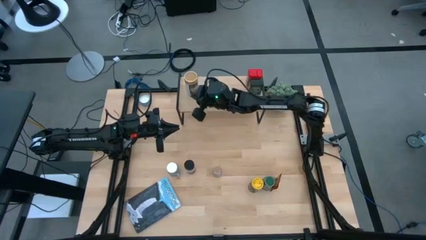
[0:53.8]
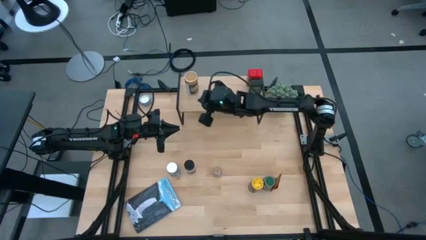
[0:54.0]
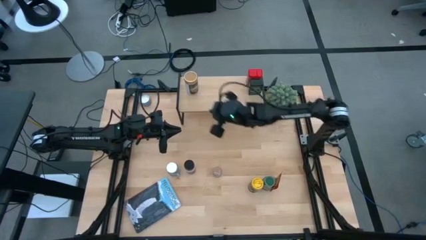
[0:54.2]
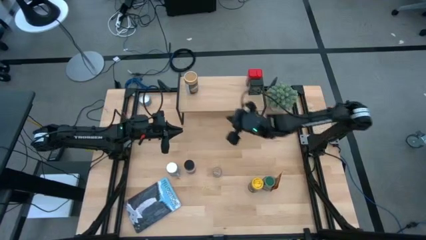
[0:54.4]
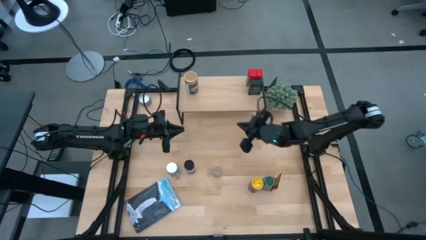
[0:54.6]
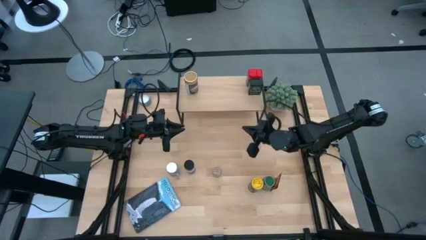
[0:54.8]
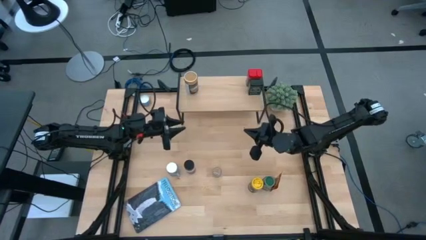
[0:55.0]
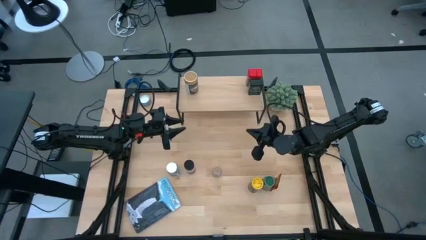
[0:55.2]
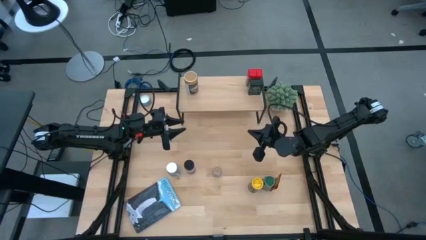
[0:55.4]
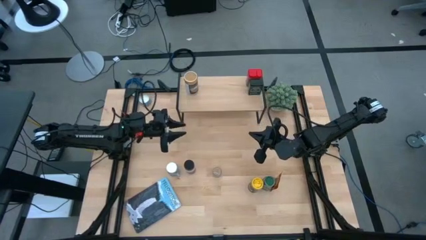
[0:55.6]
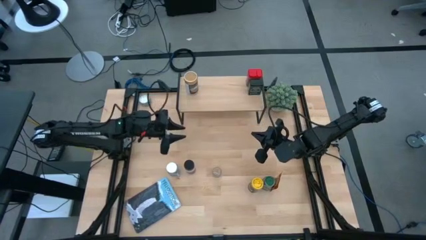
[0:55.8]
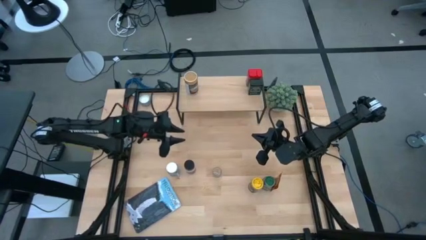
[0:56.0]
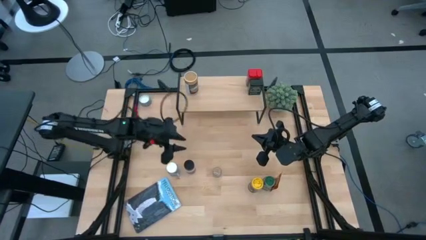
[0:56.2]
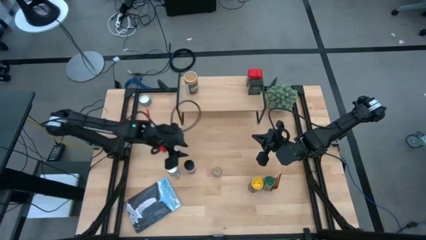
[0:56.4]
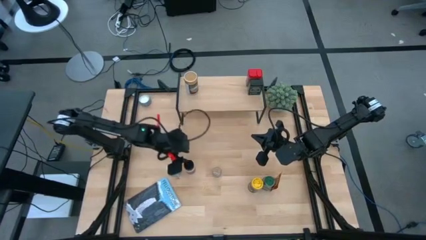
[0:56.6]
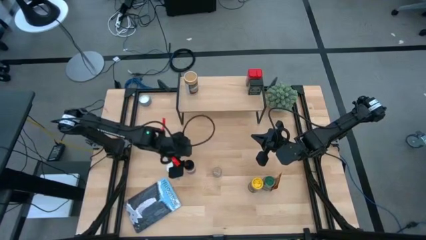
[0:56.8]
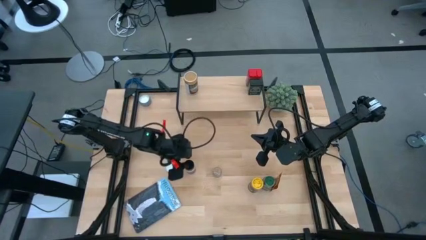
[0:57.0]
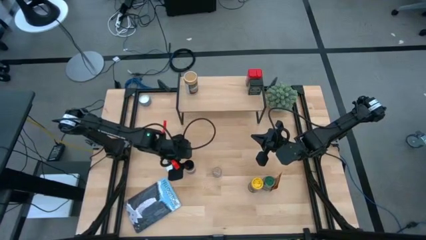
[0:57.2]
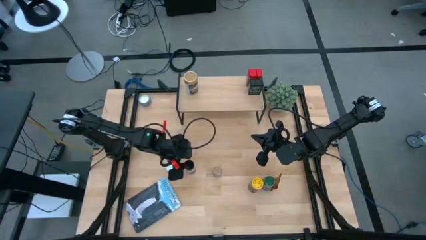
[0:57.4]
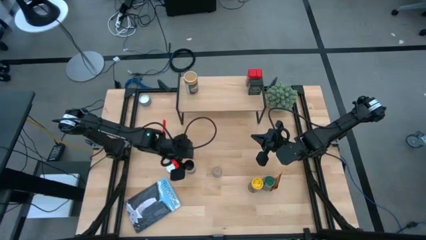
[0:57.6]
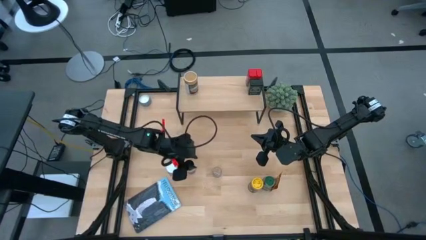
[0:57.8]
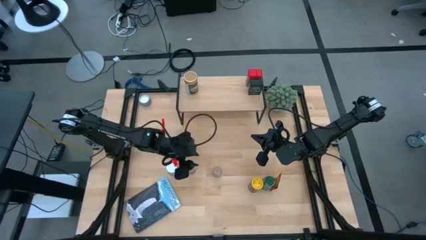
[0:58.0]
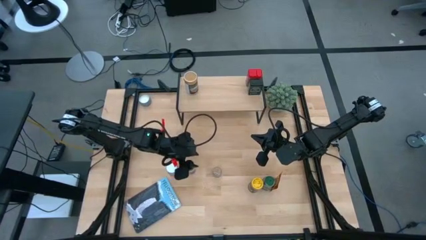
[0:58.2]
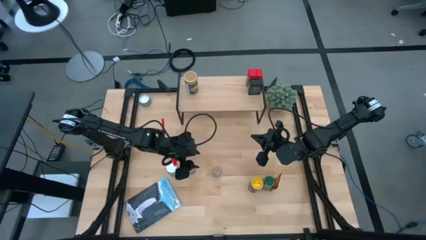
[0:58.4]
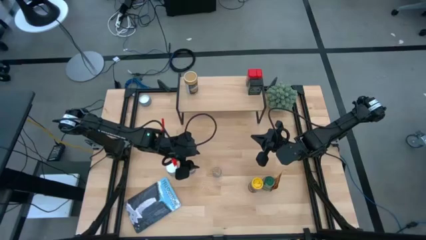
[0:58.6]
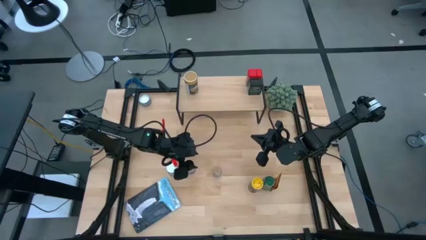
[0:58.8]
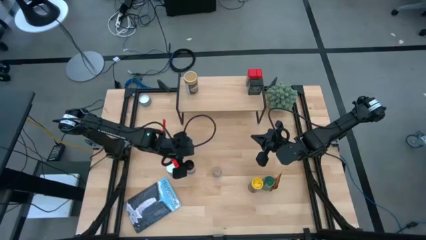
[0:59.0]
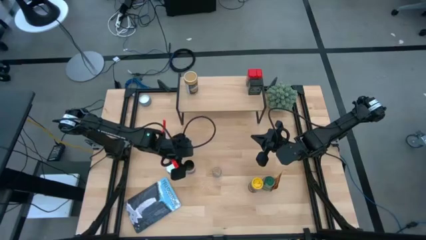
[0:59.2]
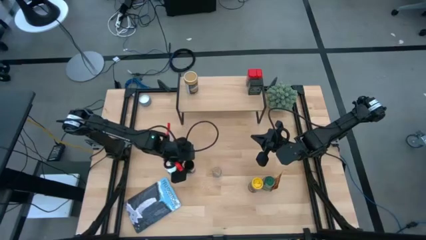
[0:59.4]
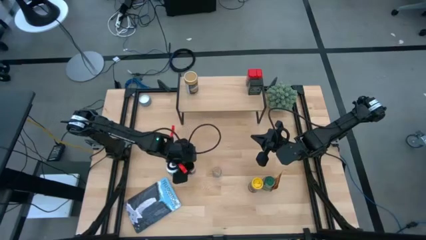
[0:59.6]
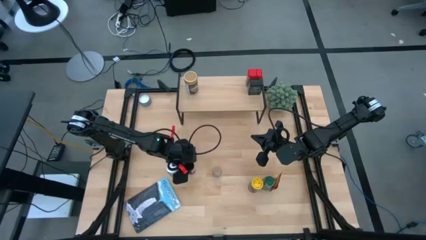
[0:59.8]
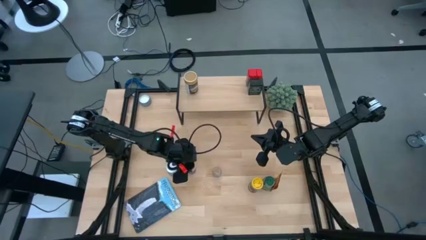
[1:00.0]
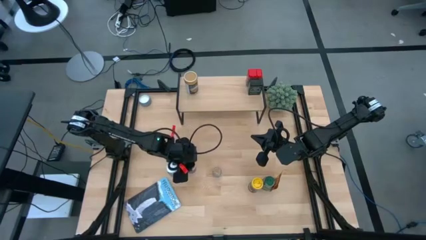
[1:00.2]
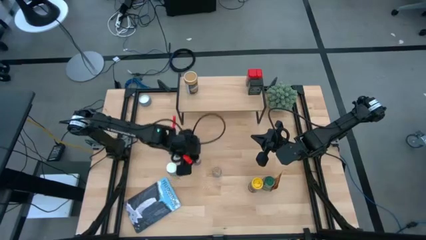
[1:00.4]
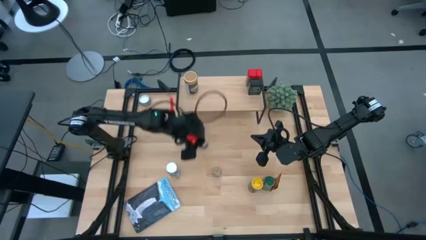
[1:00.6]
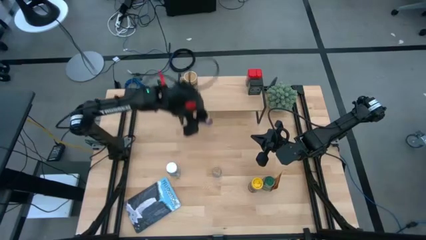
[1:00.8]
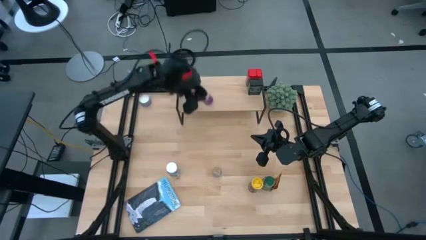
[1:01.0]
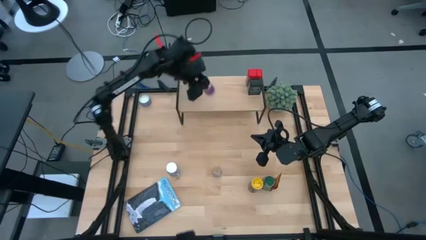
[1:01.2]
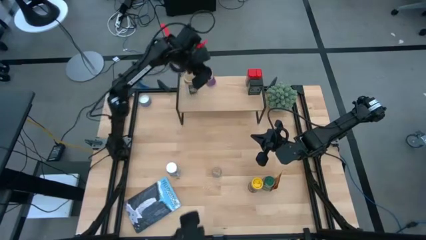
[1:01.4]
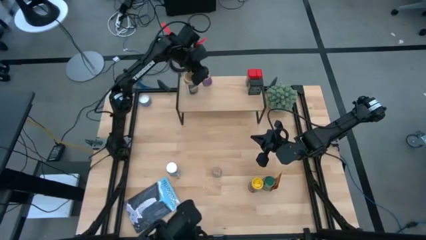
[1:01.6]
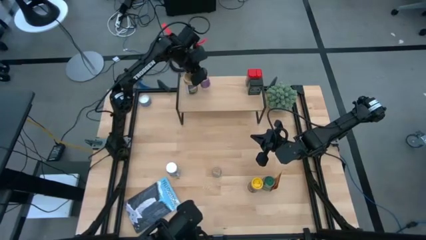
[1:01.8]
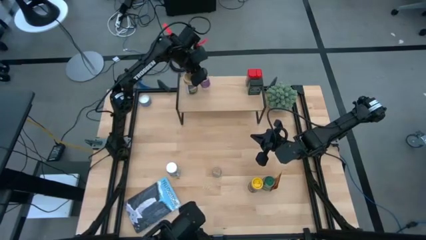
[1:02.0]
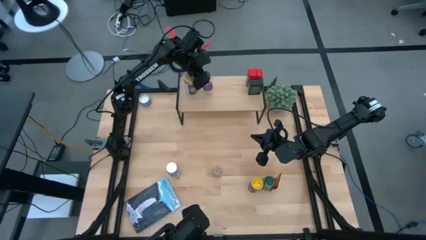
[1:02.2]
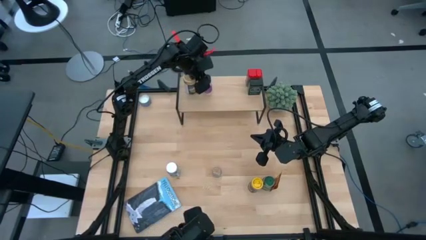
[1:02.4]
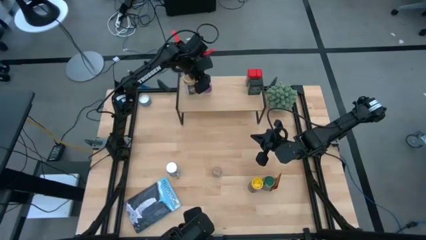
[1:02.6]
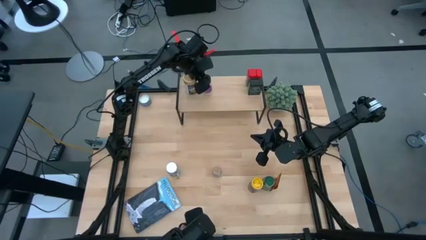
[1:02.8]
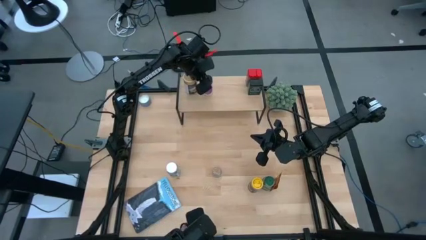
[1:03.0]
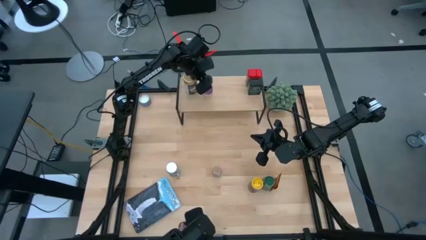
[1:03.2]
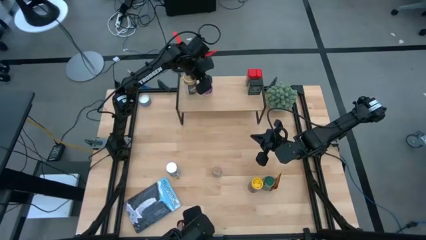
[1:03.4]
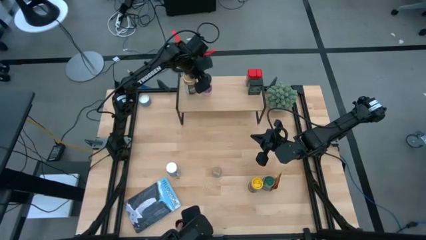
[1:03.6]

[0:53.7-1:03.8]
Task: Shelf spices
Put the black seasoning bottle on the shelf

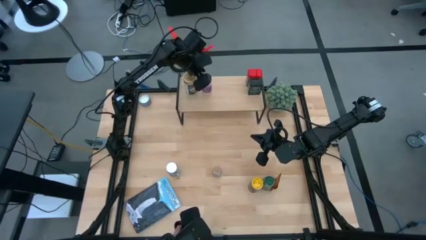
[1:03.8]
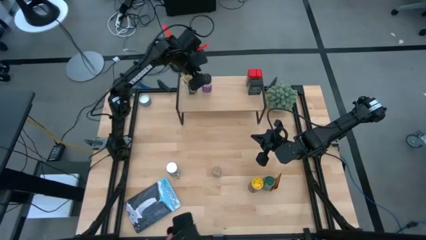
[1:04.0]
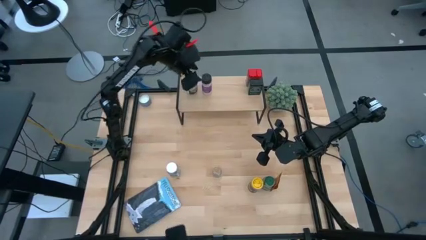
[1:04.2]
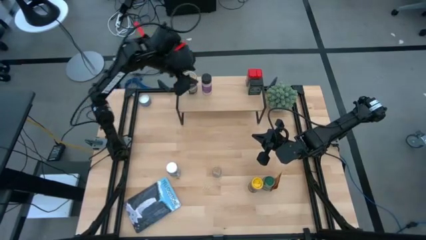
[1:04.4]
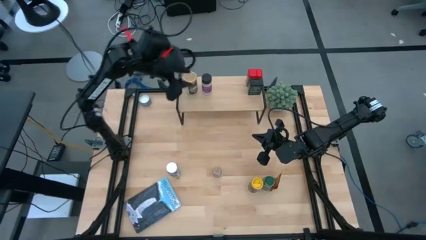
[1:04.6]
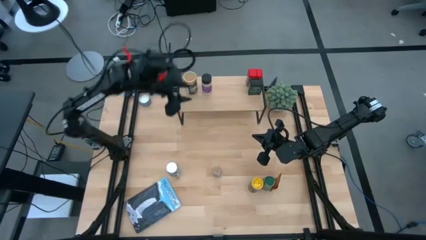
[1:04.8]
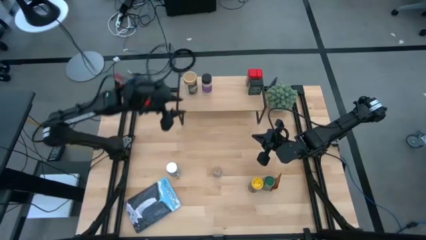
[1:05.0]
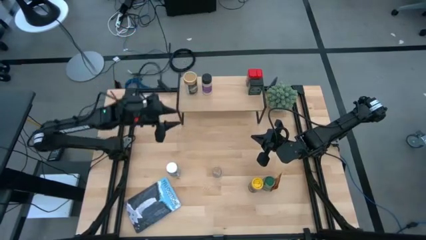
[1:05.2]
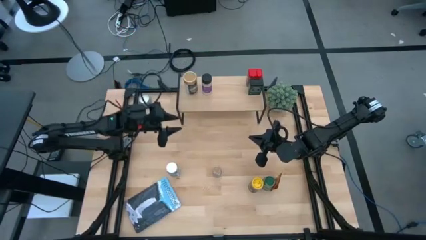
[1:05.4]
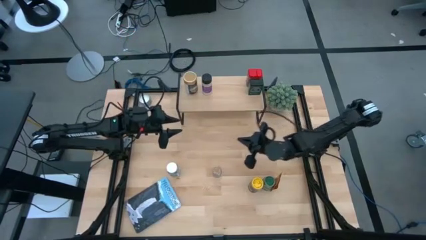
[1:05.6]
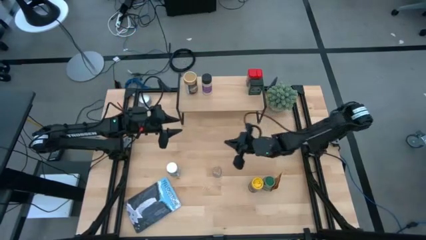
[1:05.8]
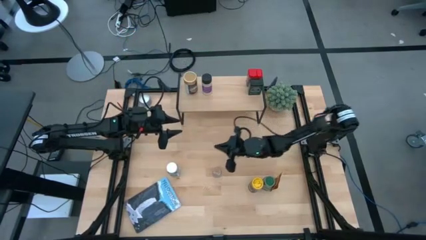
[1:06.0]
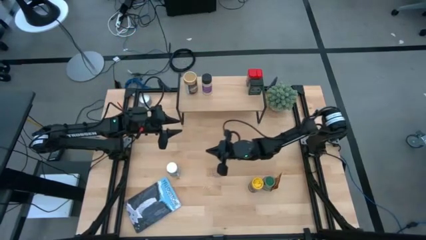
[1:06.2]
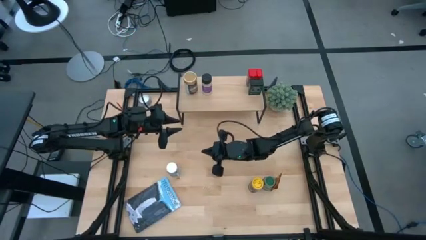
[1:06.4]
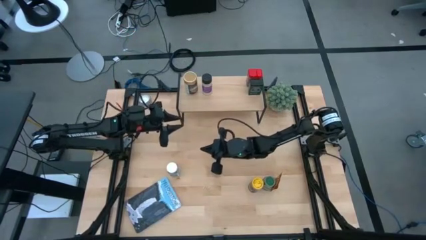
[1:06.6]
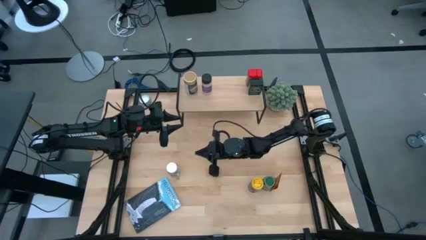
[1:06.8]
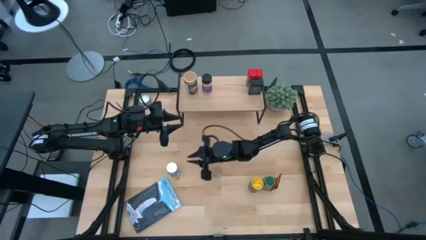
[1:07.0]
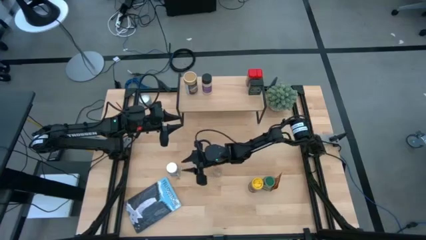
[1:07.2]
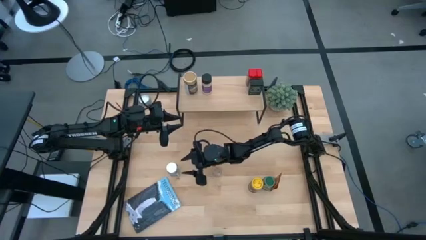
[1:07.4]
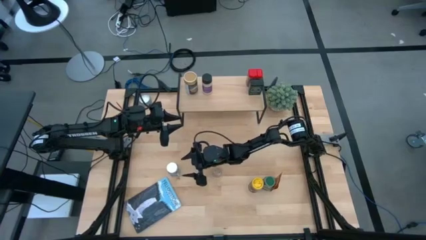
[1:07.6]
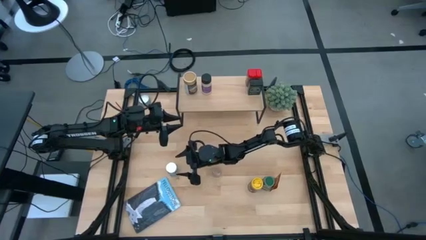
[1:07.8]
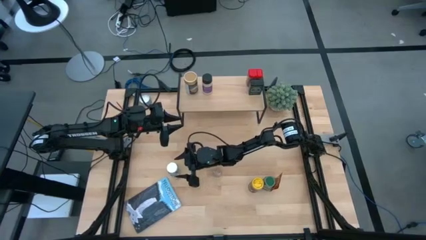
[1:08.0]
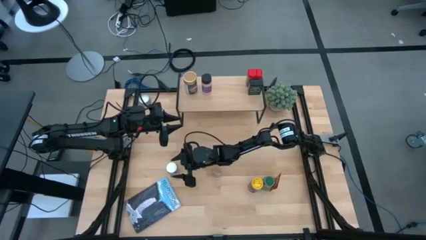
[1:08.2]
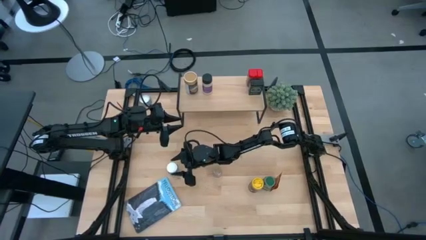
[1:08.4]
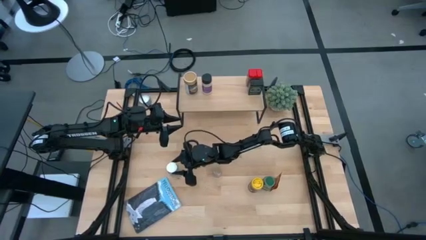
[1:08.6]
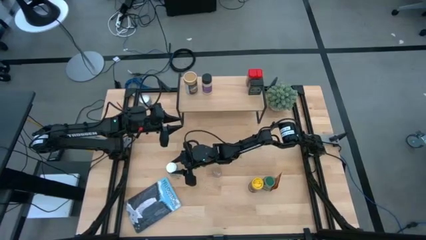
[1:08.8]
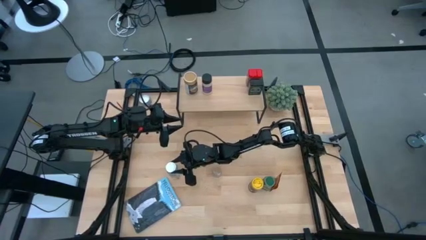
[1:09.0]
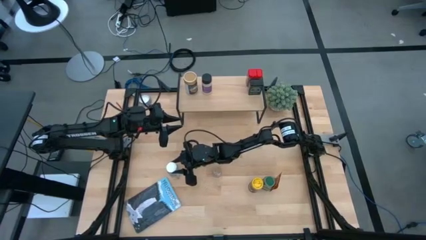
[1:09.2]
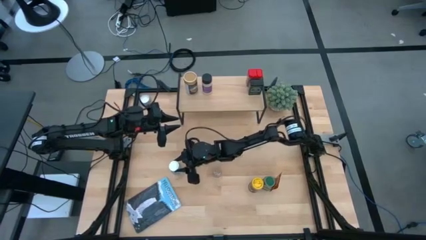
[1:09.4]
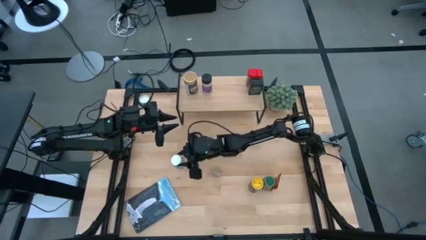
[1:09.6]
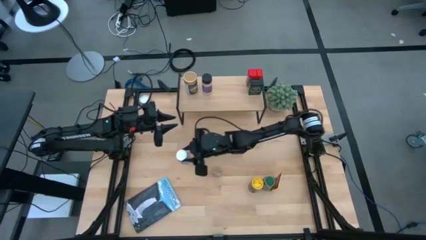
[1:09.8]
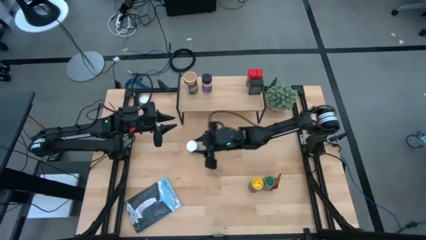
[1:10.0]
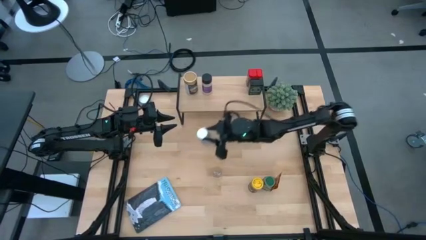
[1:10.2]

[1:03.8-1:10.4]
Put the white seasoning bottle on the shelf

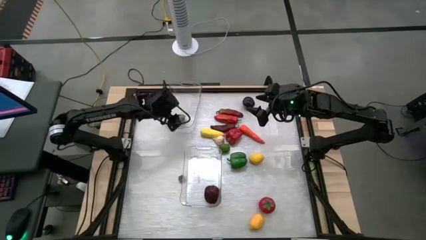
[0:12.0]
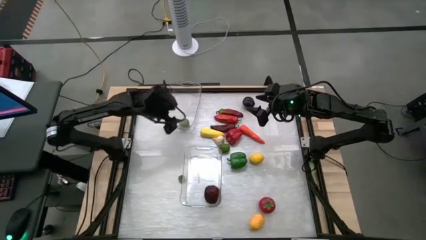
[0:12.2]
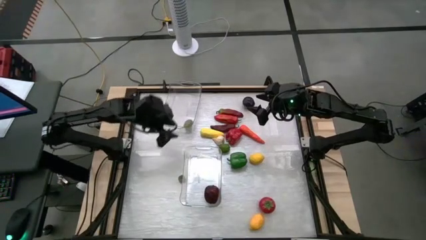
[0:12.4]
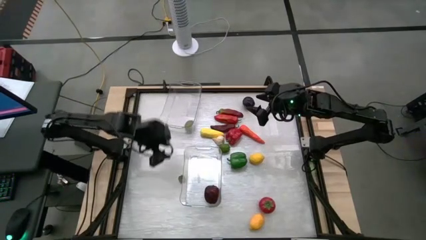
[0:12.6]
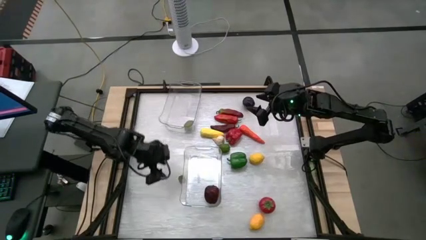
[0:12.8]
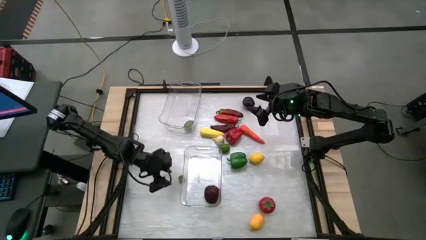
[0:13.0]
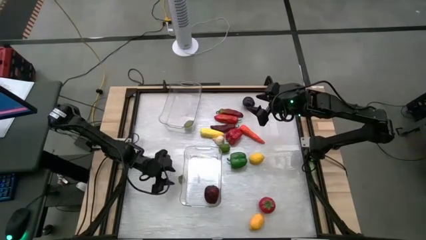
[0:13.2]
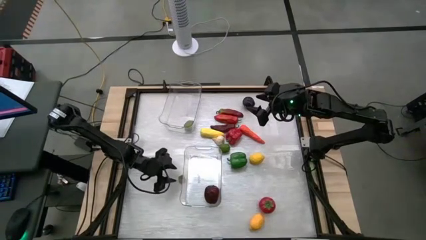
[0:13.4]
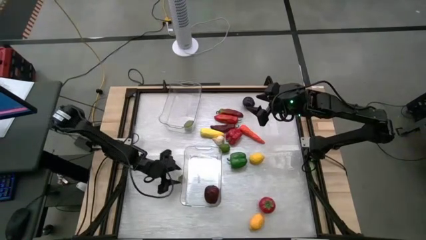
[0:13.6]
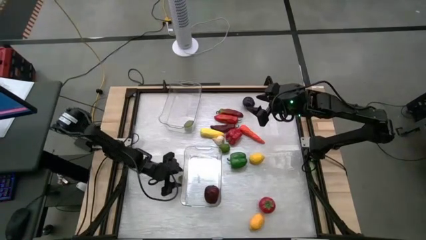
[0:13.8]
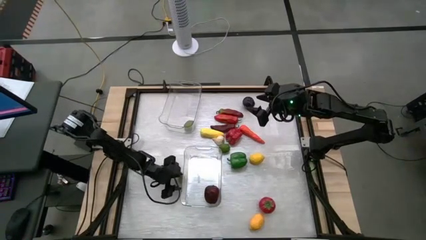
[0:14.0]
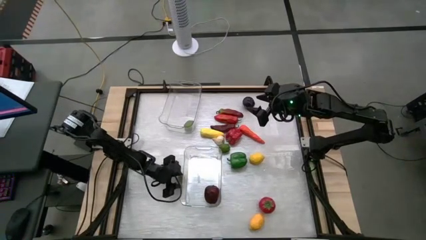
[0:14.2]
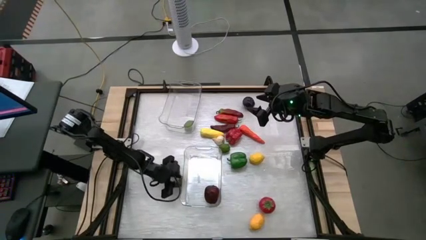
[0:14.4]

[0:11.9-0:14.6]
Task: Sort produce into baskets
Put the red strawberry into the top transparent bin
